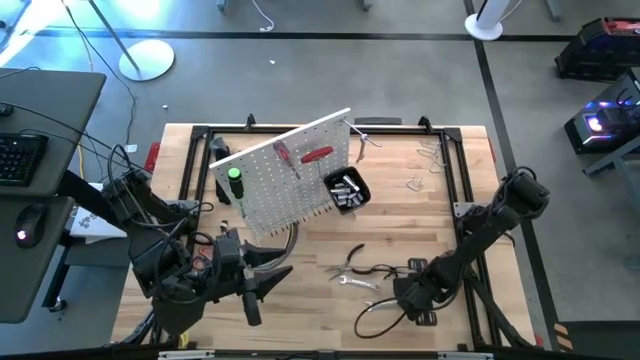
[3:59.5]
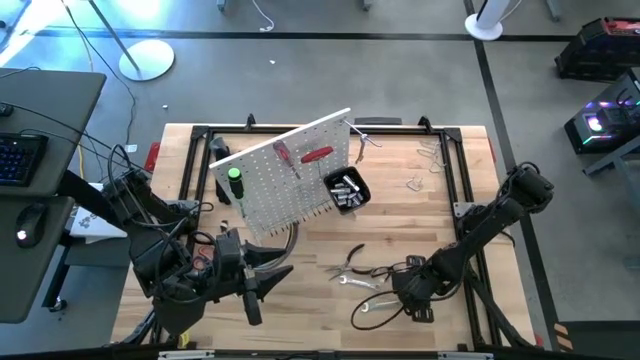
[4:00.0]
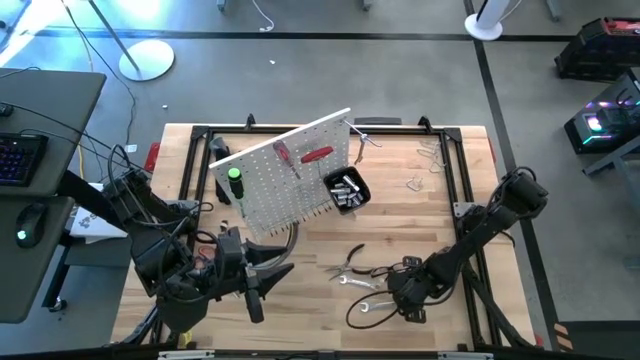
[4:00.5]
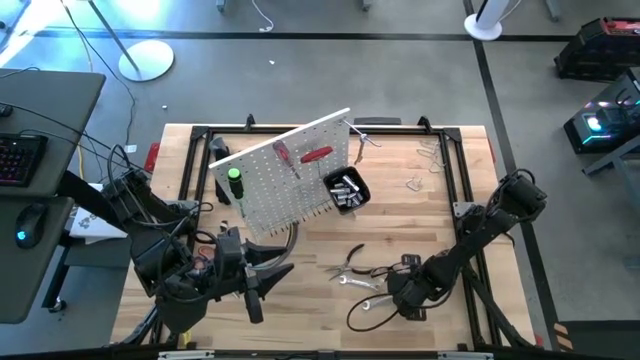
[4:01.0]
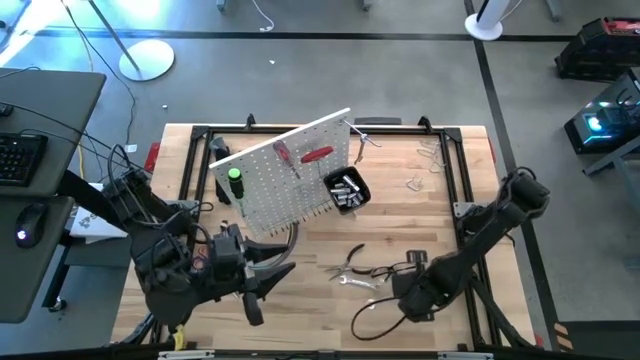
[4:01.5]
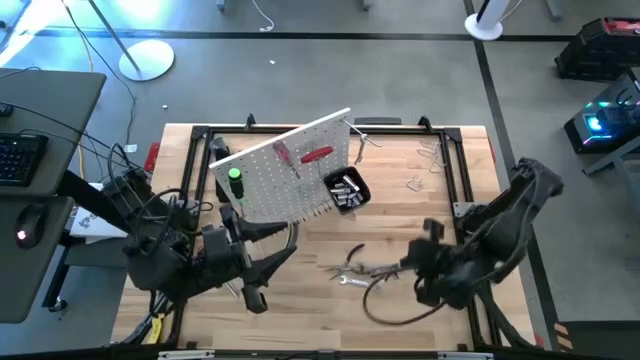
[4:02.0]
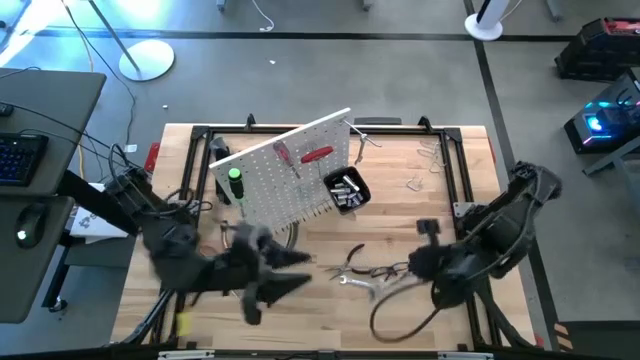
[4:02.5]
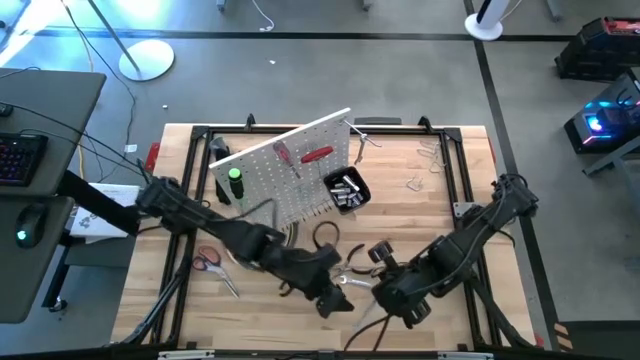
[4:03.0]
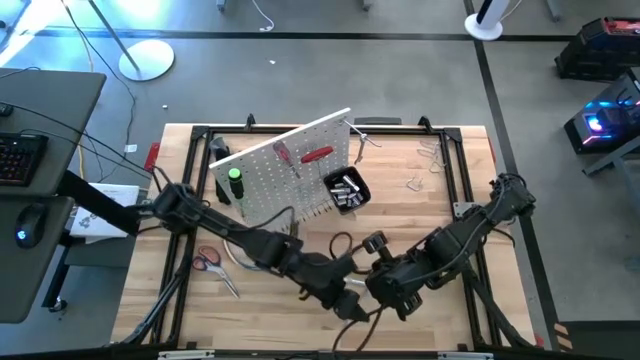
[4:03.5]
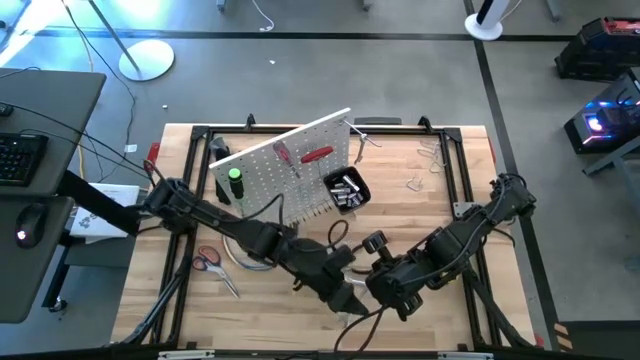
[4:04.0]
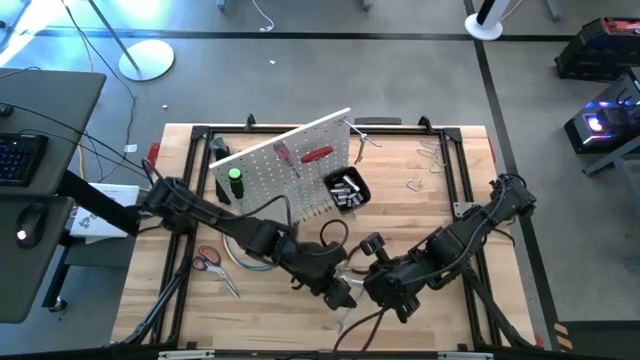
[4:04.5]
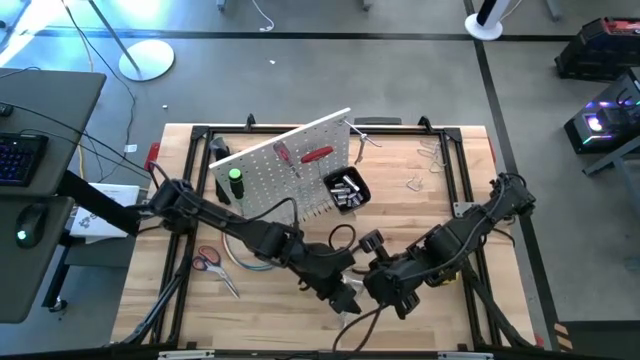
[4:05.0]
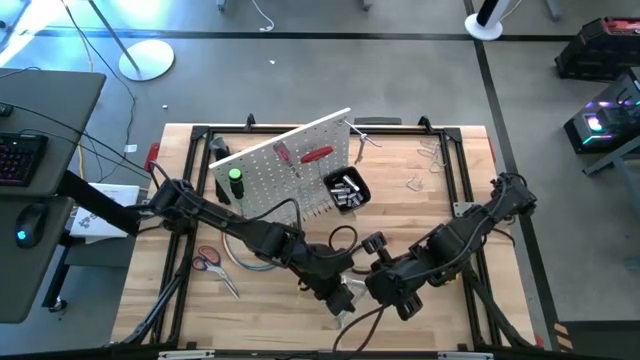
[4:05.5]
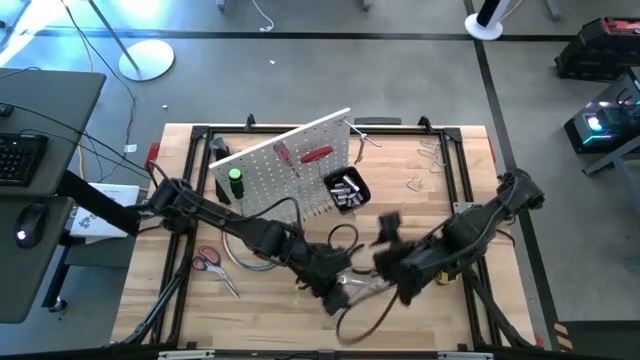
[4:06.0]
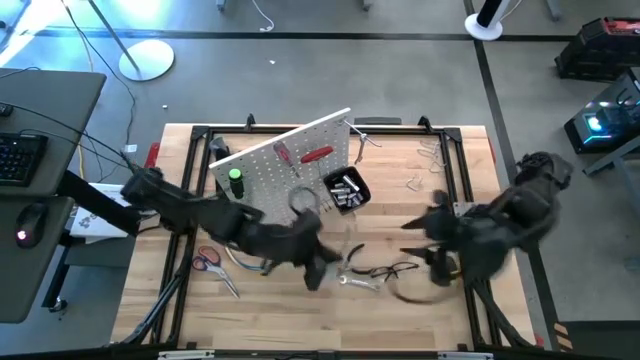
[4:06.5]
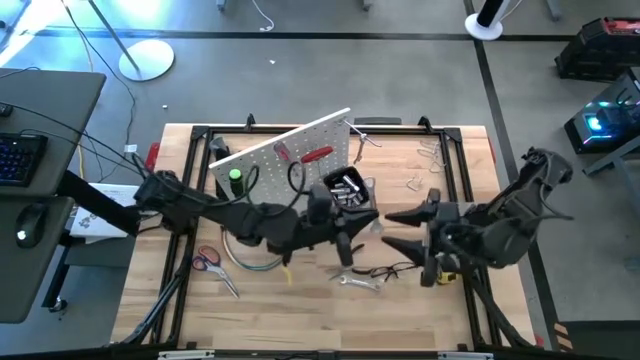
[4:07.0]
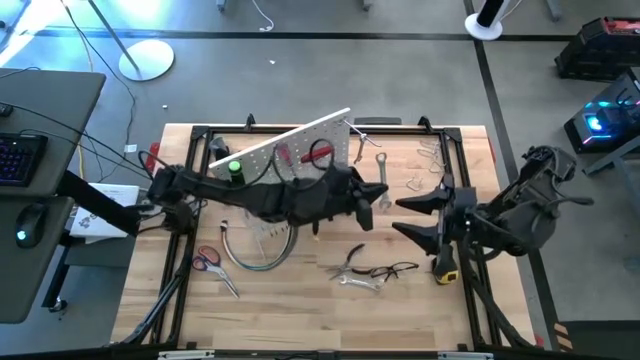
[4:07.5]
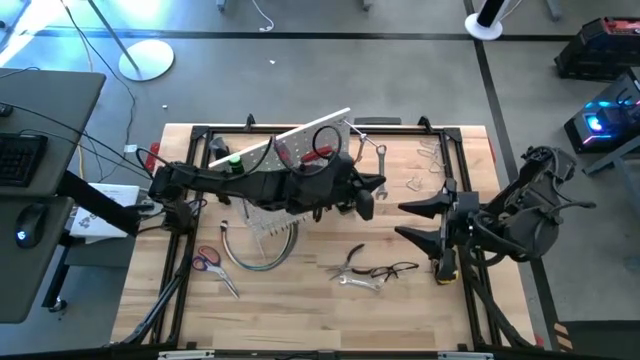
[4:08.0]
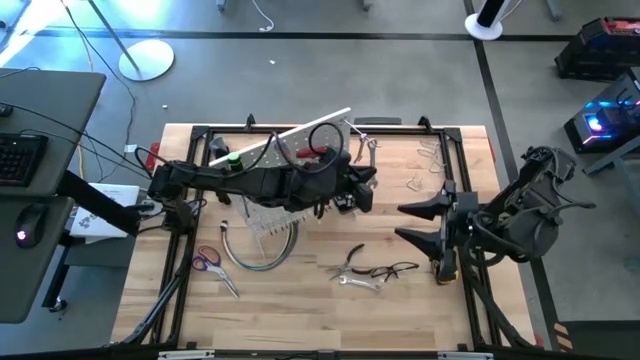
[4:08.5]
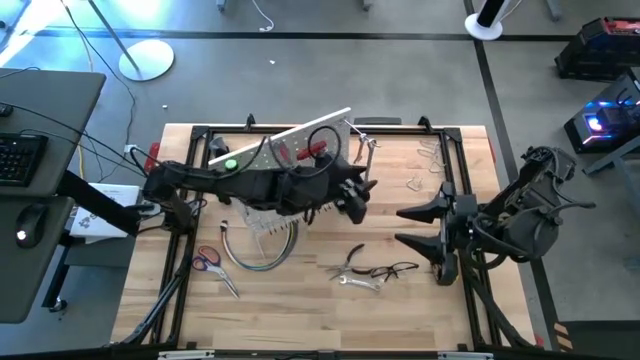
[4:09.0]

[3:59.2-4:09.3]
Task: Hang tools onto peg board
Hang the wrench on the peg board

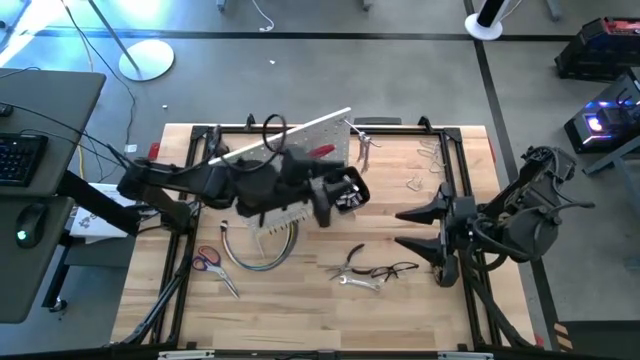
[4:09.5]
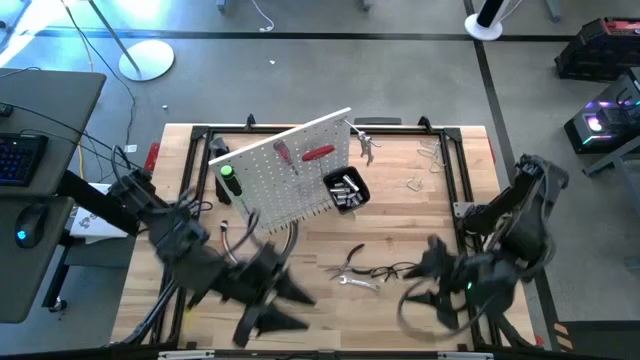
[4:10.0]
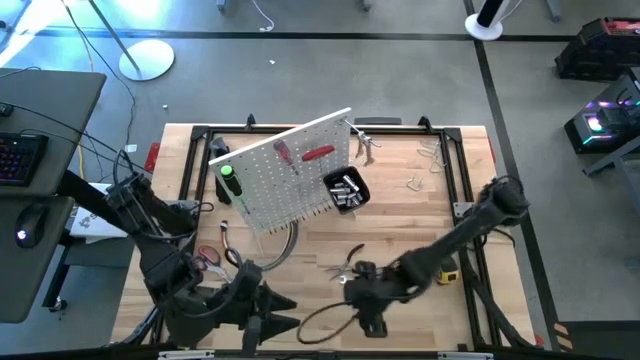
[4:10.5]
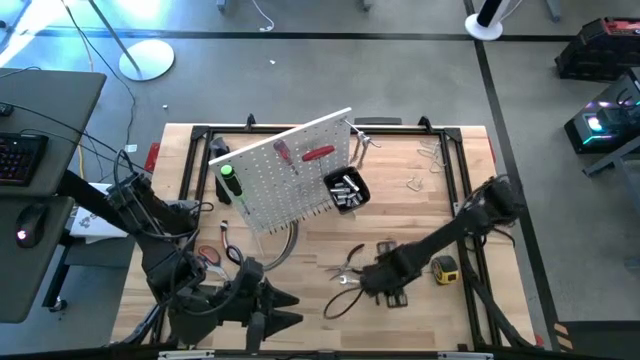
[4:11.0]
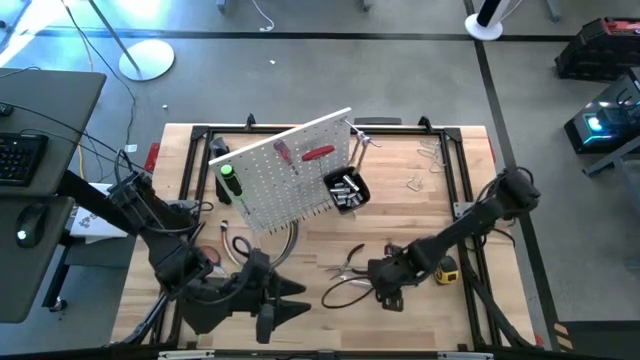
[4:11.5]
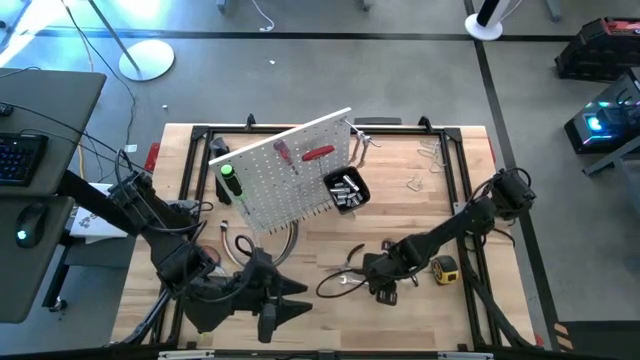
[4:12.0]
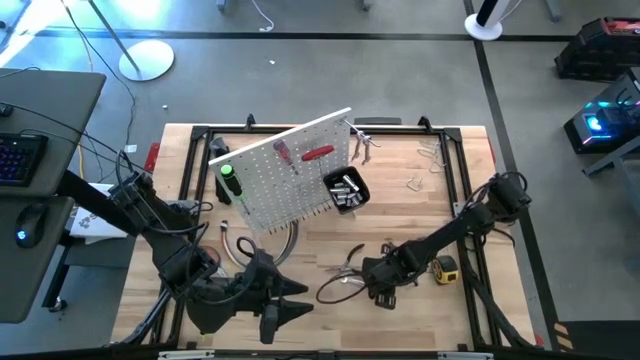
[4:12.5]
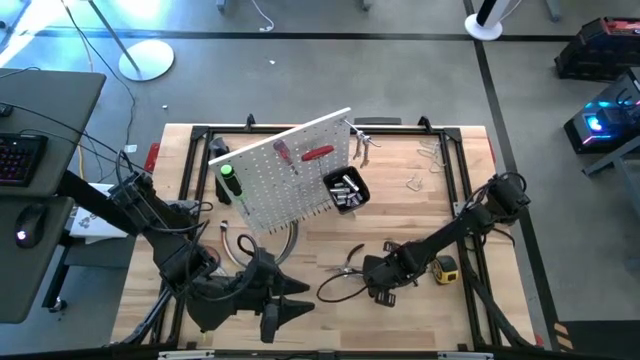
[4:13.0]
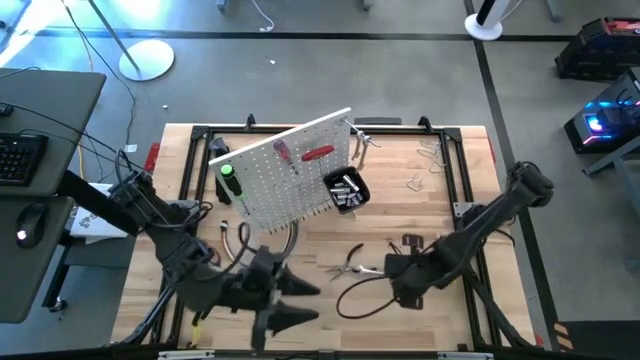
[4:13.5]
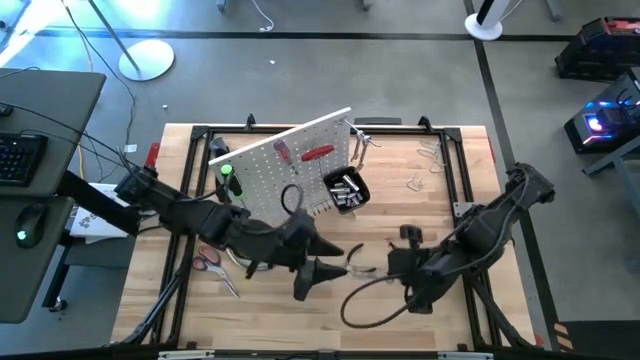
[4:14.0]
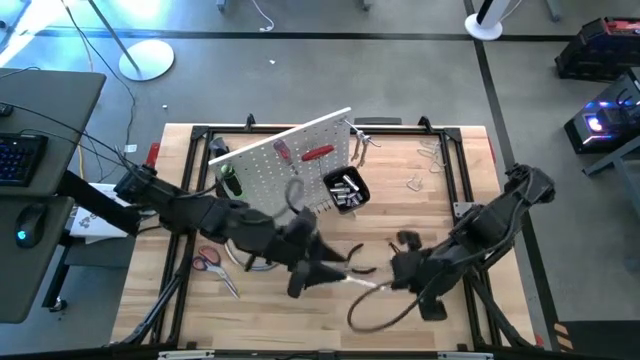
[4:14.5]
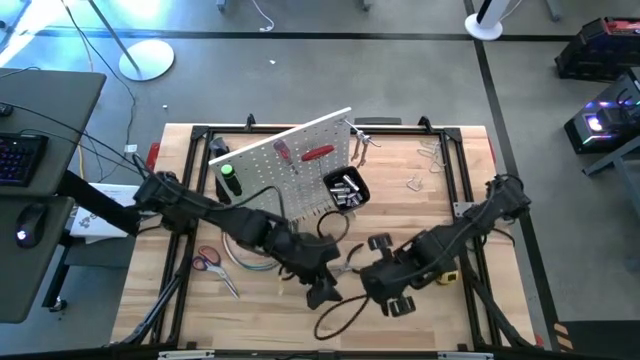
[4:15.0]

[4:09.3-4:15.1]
Hang the wrench on the peg board

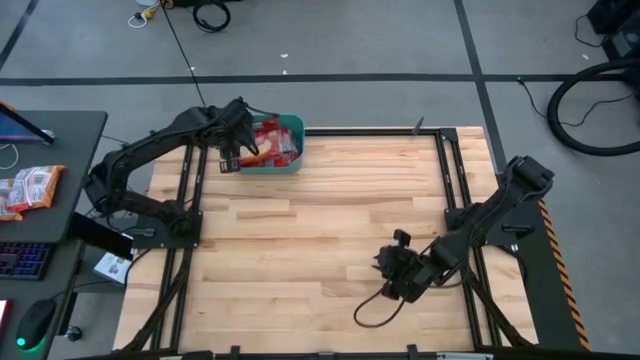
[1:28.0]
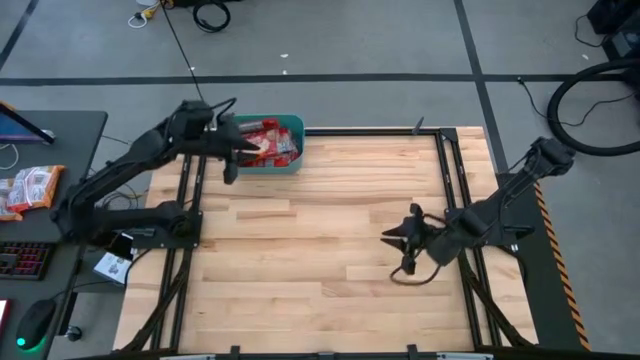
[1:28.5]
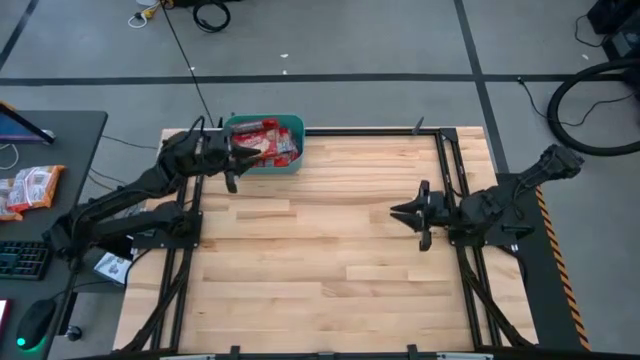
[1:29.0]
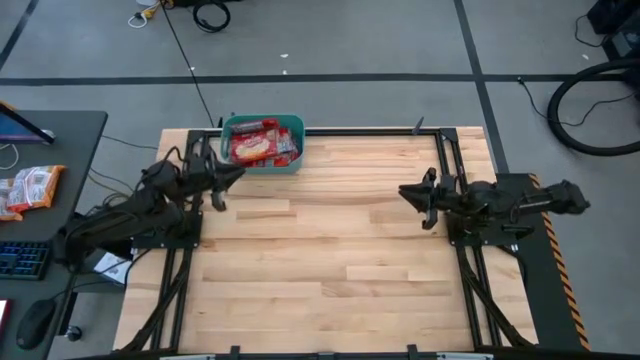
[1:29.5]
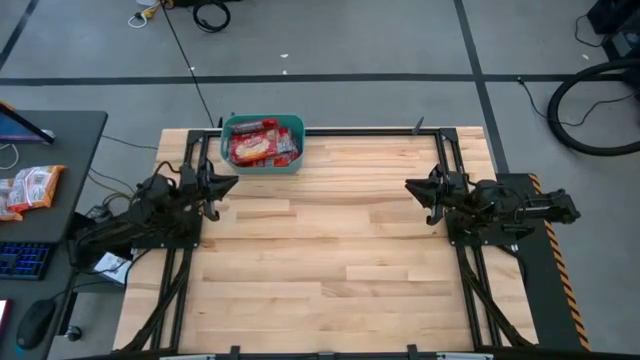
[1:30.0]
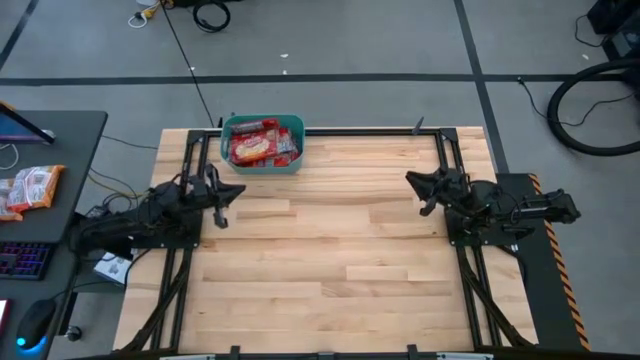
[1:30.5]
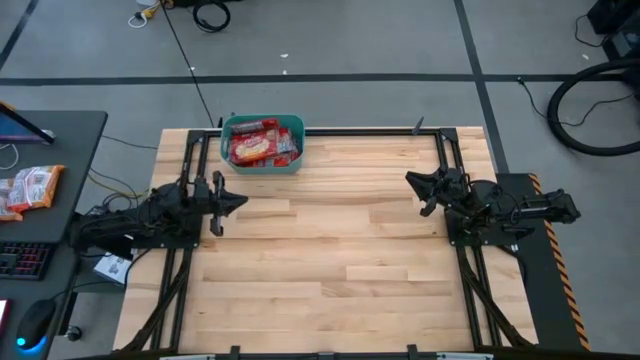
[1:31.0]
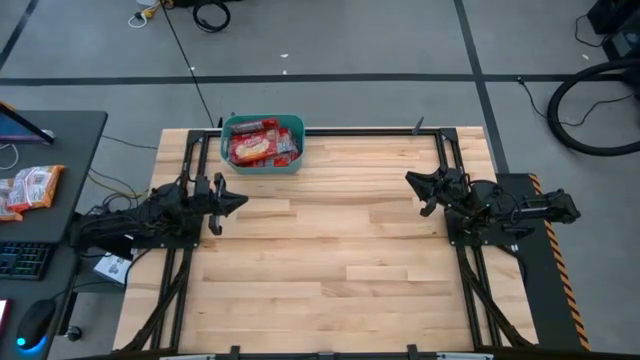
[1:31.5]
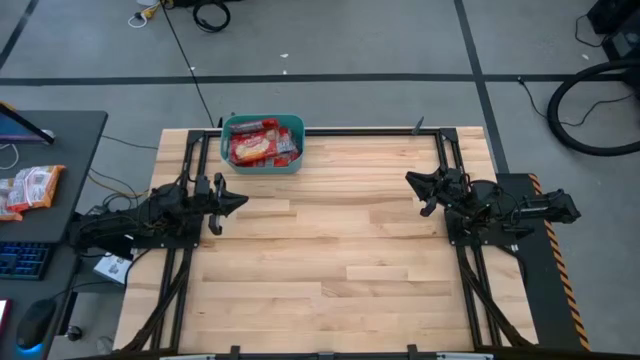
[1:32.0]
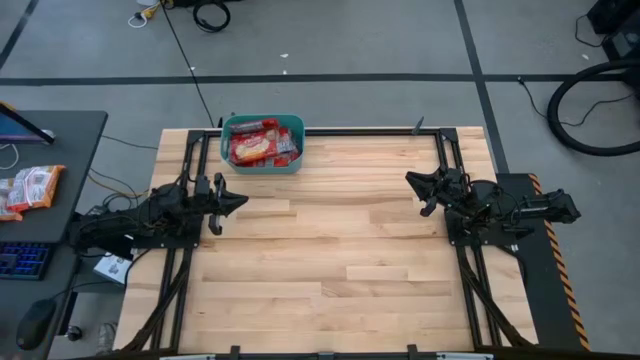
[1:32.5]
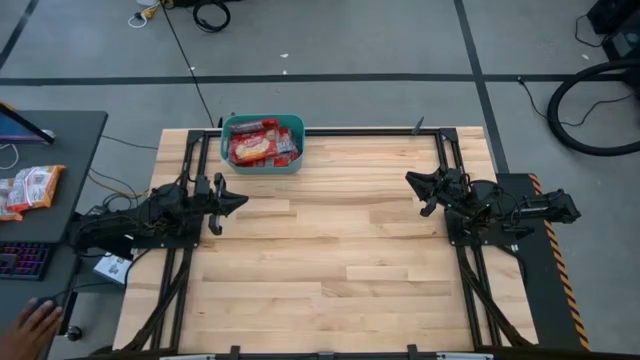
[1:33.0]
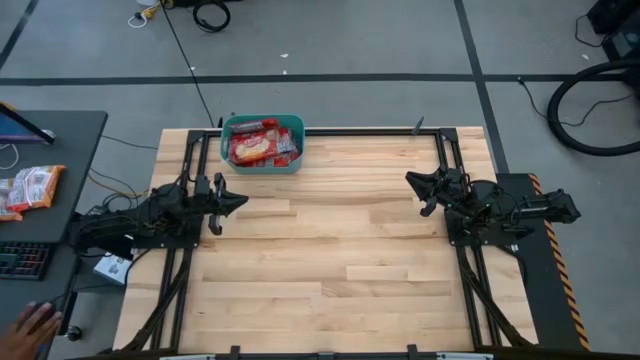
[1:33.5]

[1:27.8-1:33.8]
Task: Sort popcorn bags into baskets
Return to Home Position
